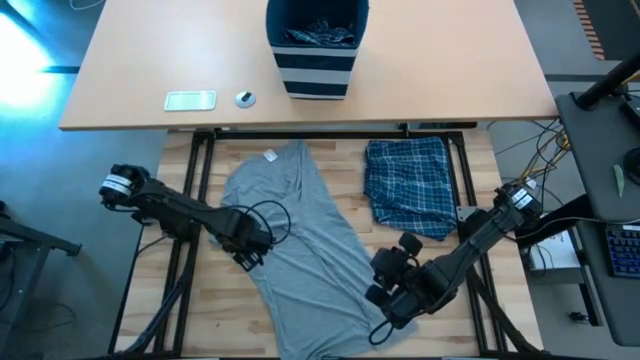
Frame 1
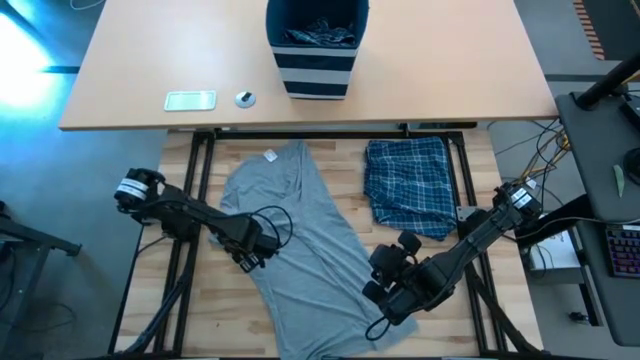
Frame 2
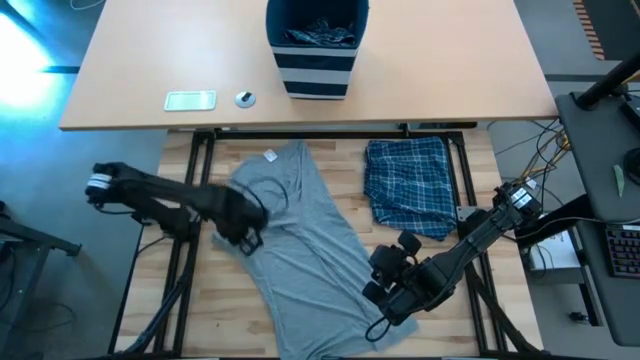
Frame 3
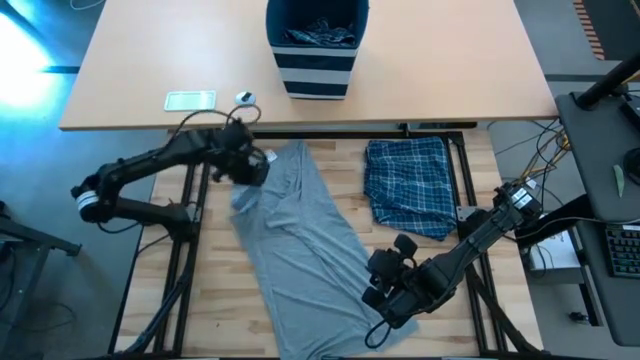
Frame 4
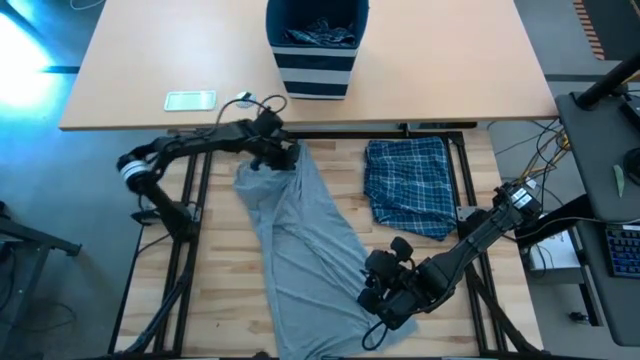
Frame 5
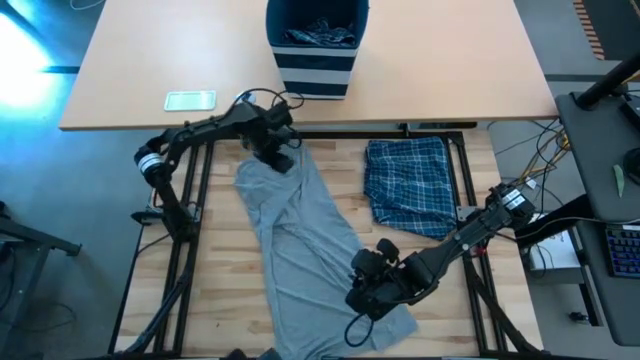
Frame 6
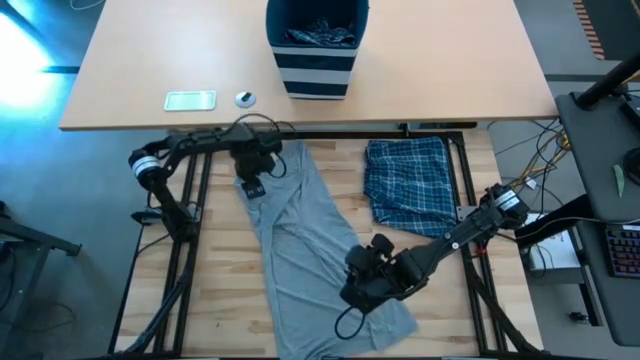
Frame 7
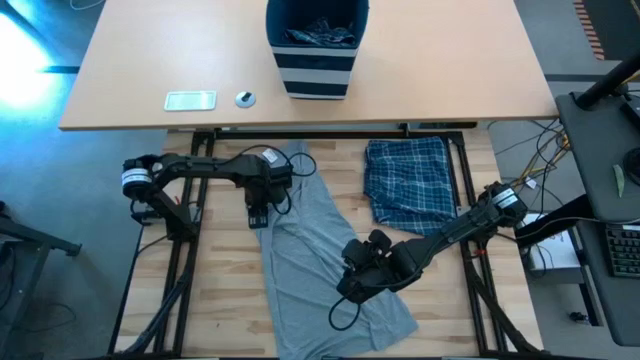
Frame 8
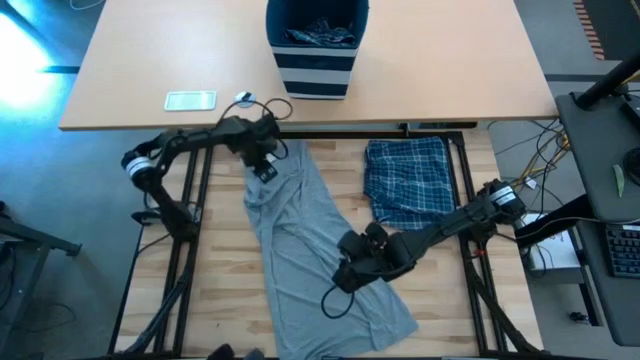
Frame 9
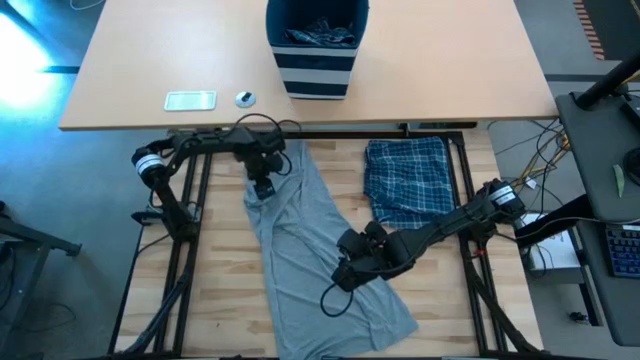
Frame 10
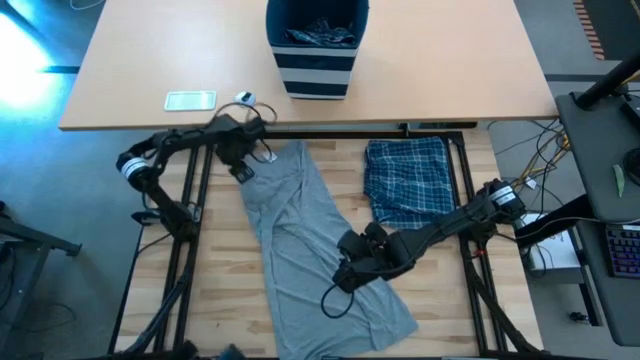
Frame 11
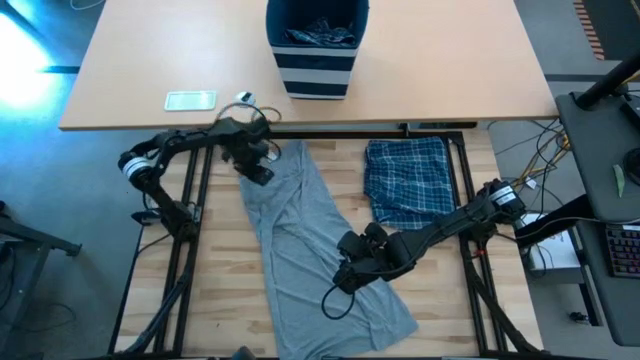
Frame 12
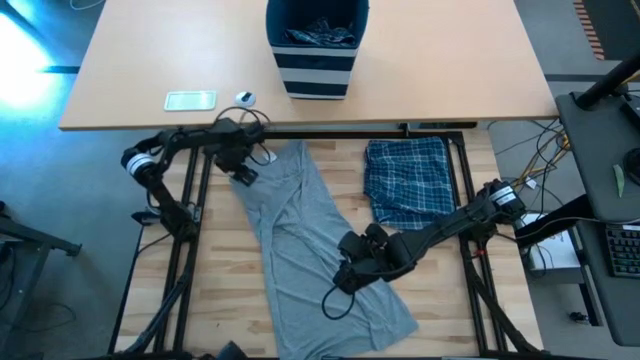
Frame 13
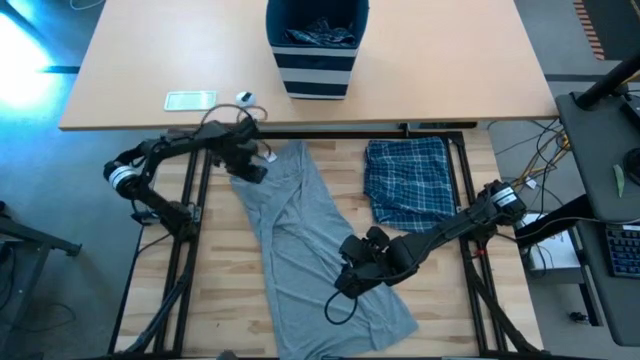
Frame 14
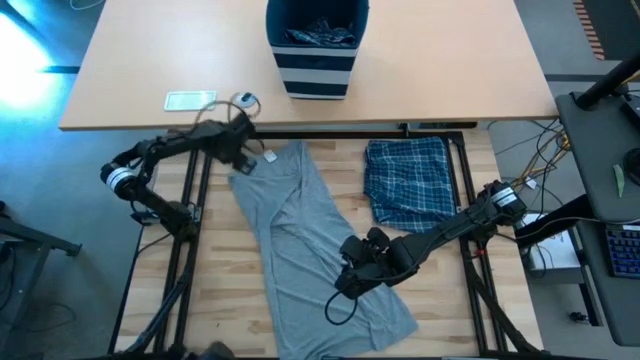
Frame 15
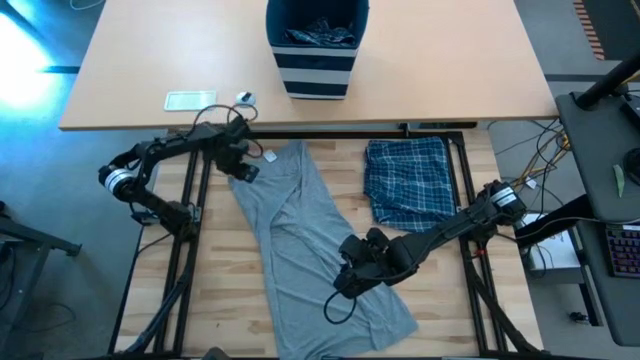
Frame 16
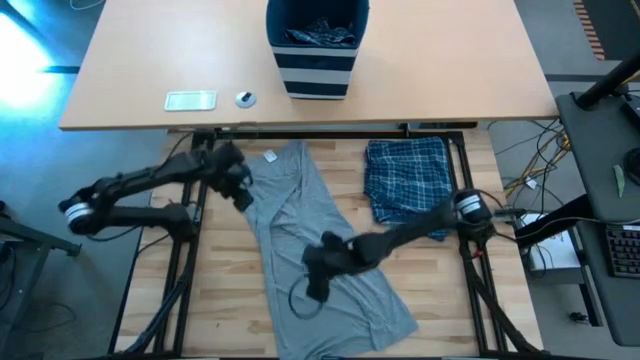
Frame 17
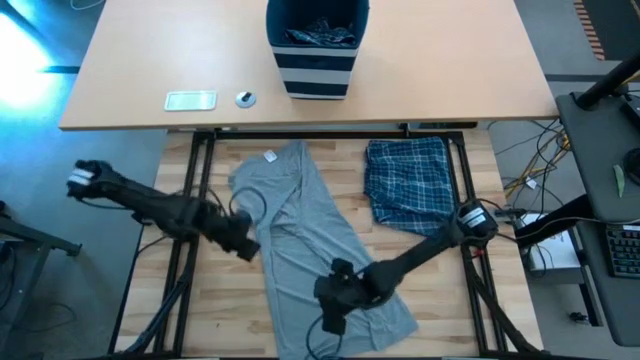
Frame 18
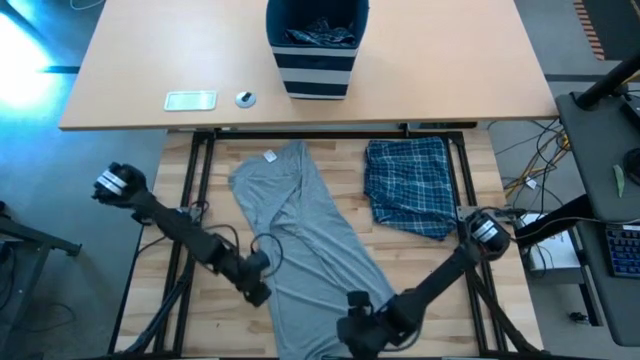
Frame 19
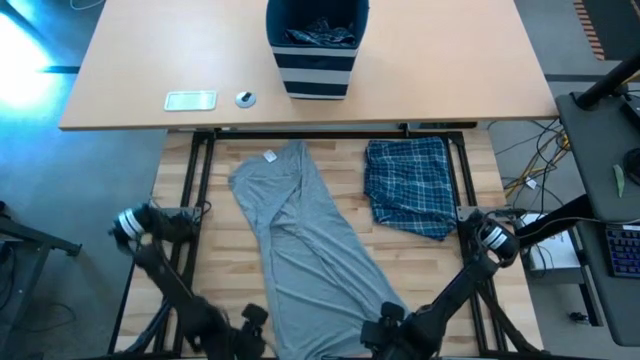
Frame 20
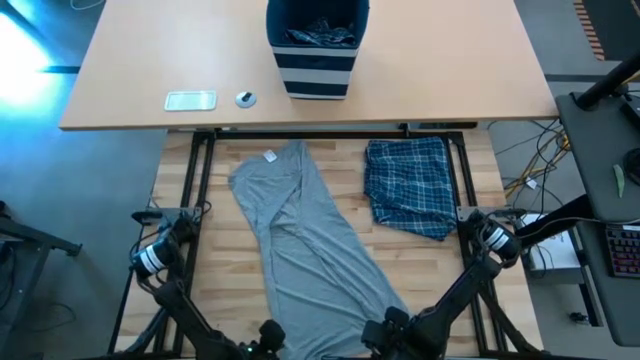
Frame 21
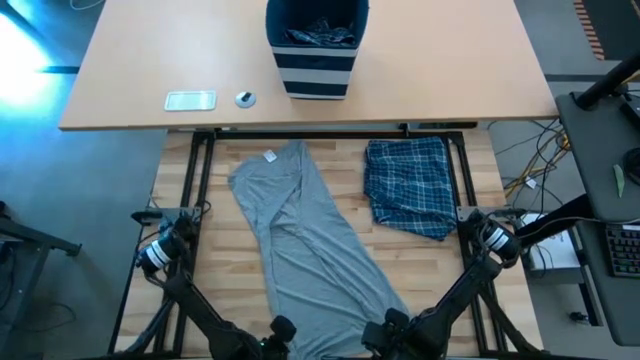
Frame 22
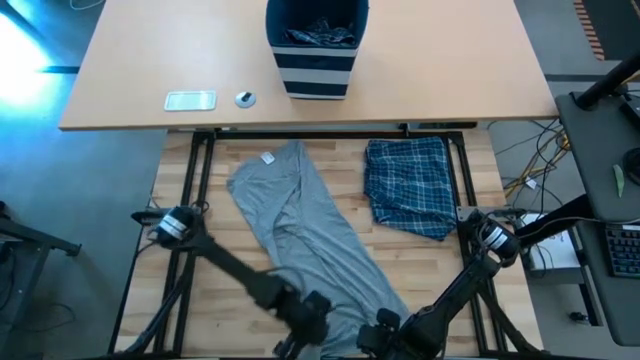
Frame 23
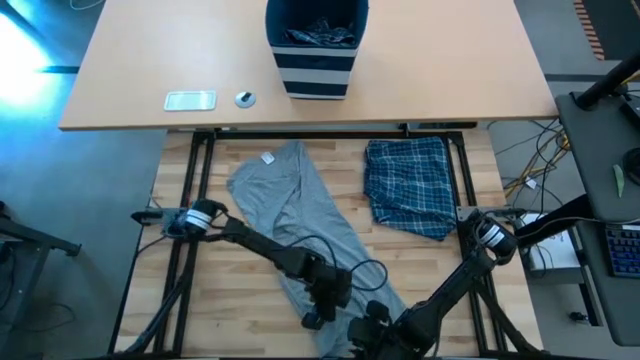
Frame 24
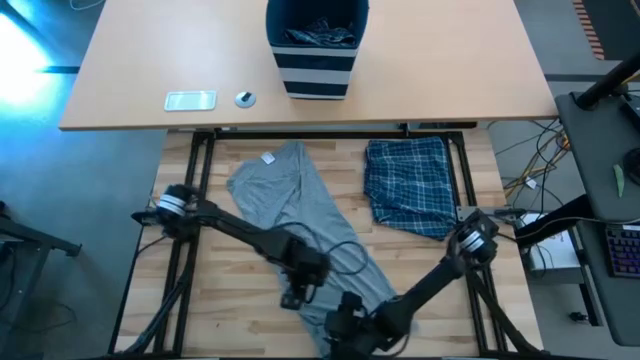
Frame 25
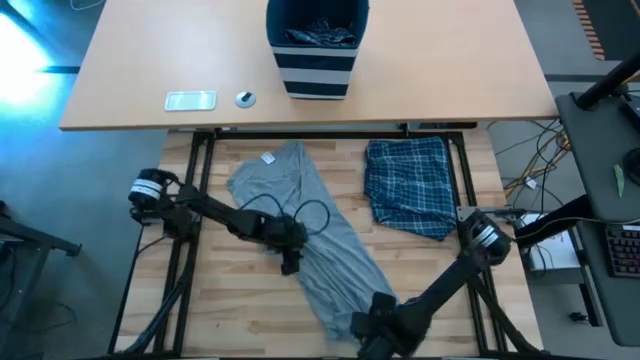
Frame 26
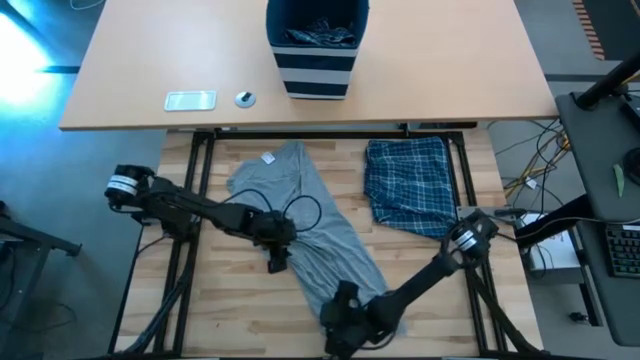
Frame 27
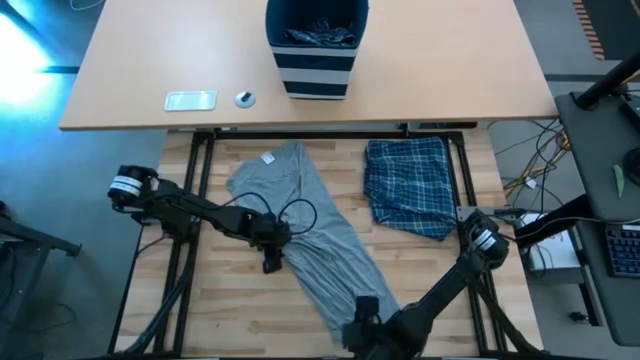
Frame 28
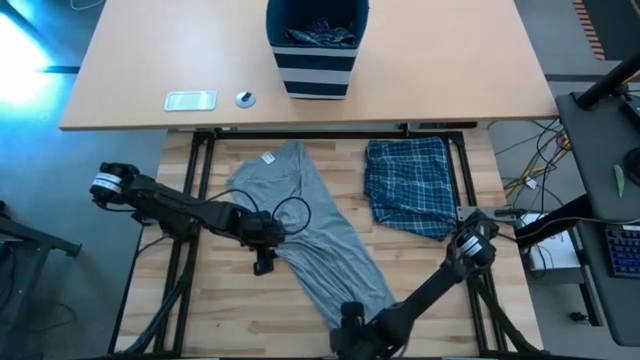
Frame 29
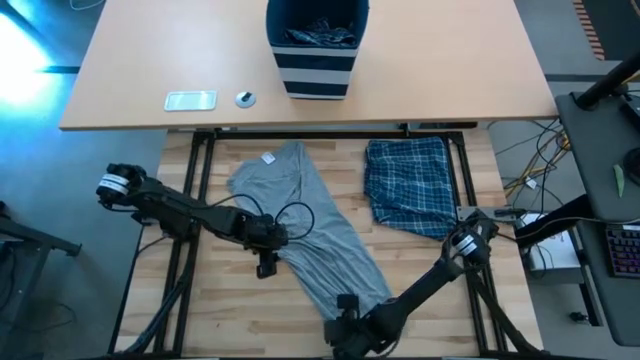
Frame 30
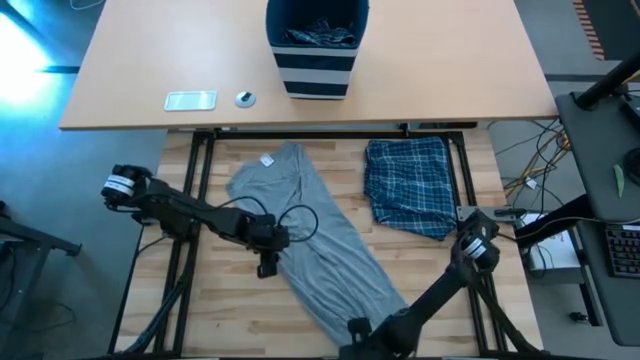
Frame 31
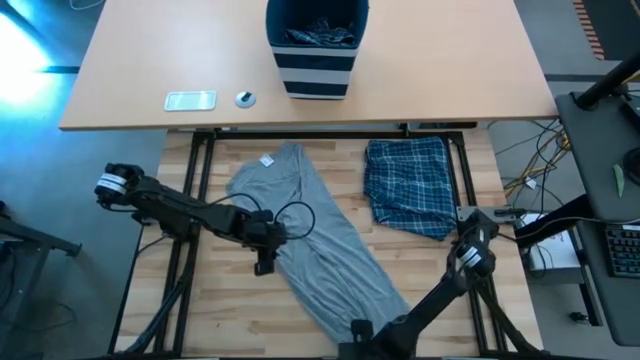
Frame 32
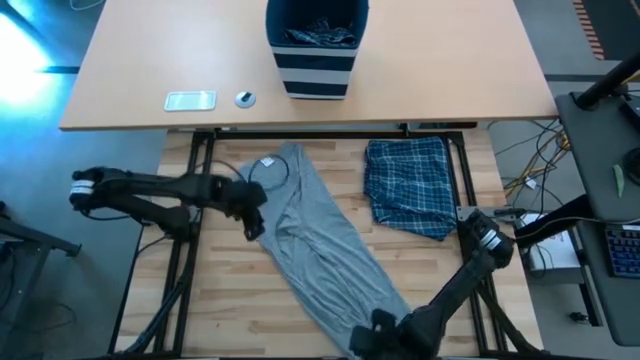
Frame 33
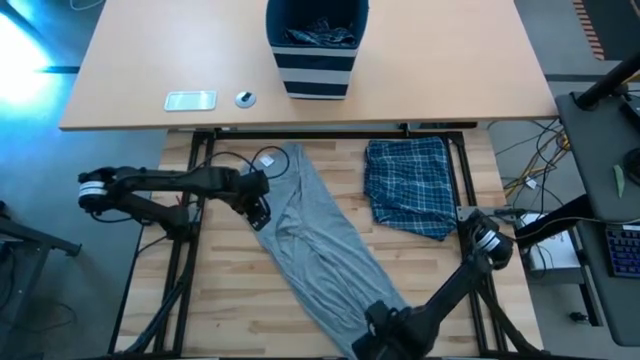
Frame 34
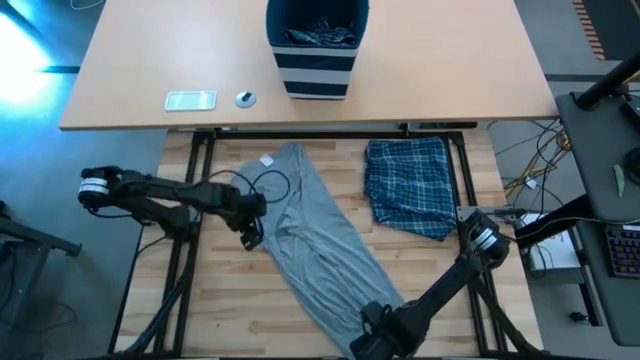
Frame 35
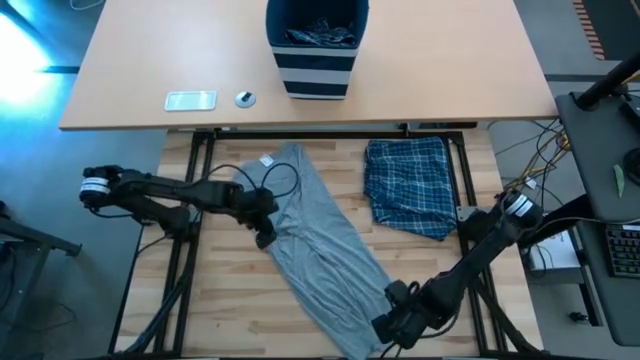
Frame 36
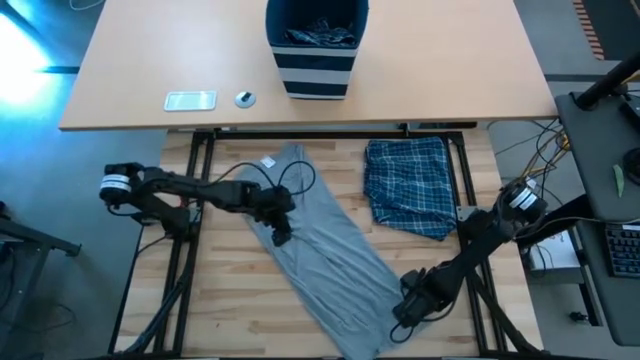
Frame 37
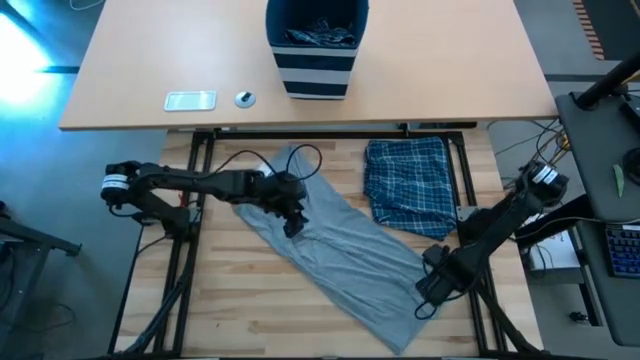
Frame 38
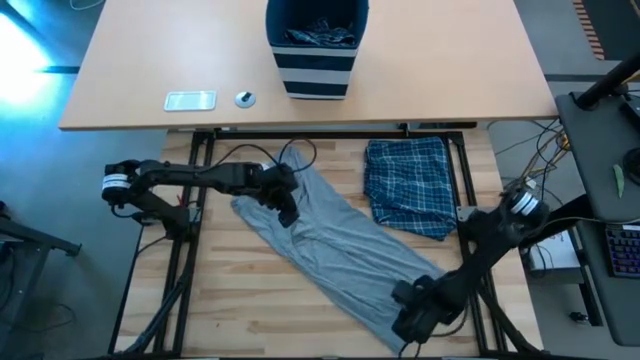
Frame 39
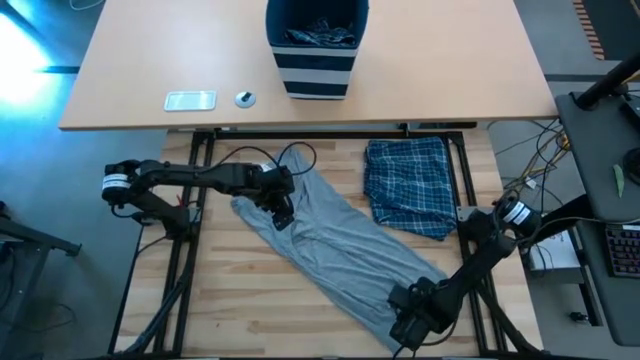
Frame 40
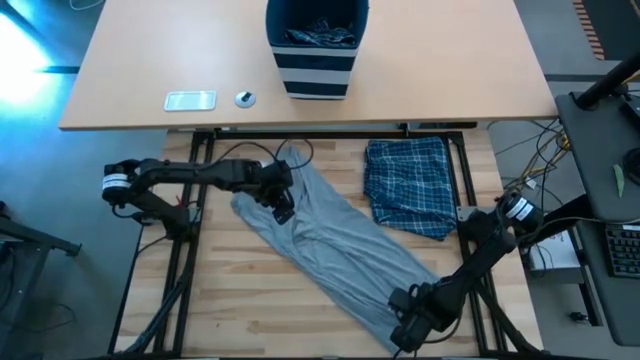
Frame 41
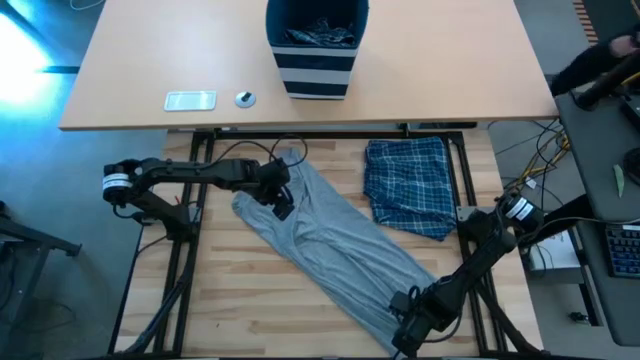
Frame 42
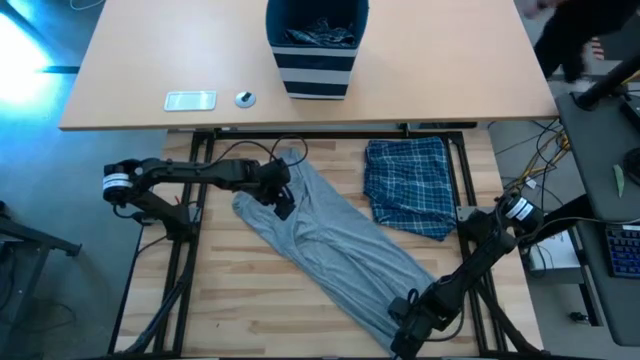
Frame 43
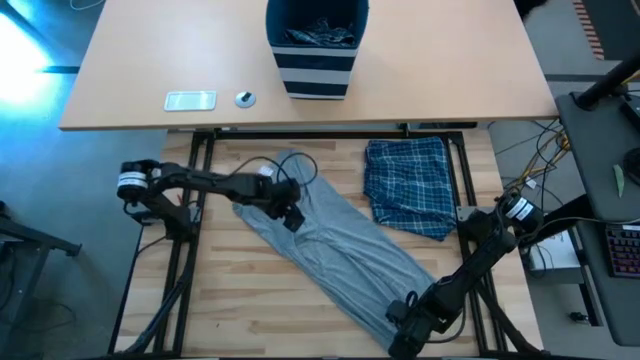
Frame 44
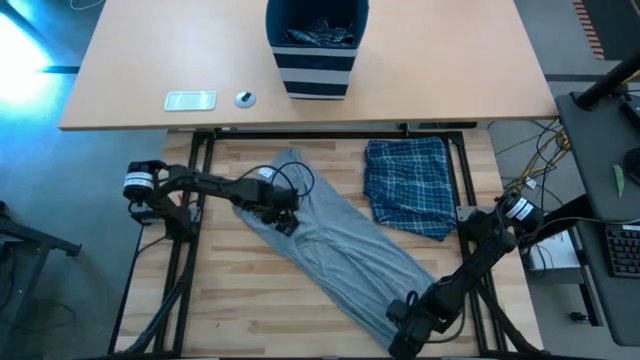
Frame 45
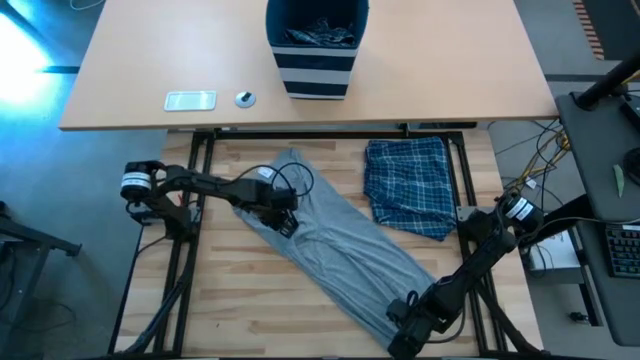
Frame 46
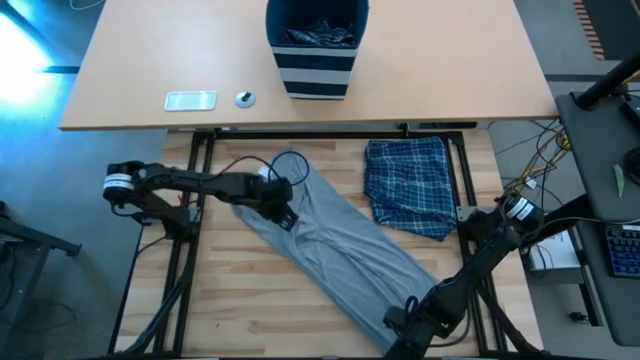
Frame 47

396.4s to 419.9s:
Task: Fold Laundry from Bin
Fold the gray shirt
